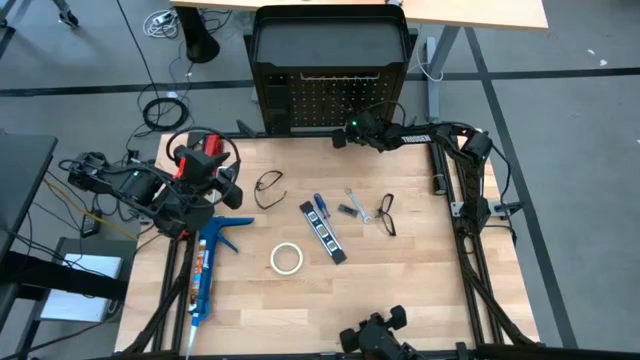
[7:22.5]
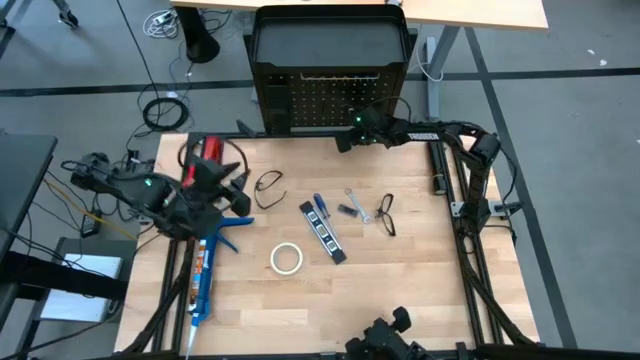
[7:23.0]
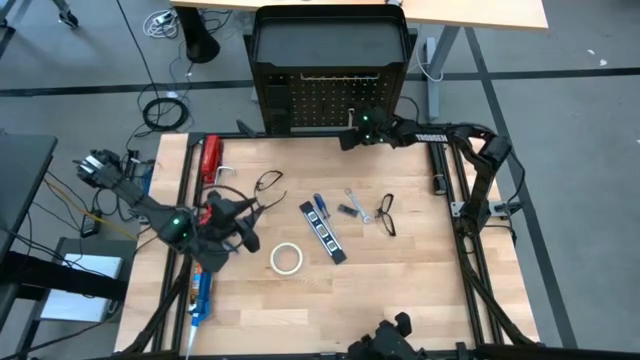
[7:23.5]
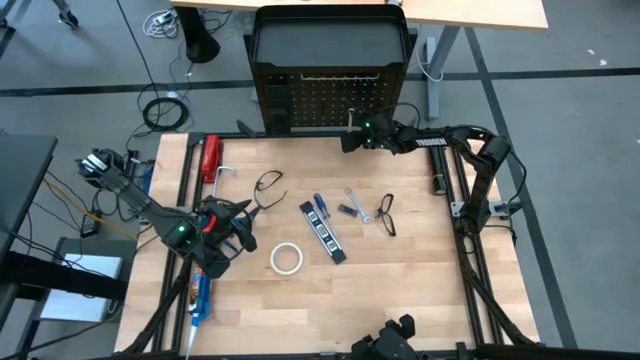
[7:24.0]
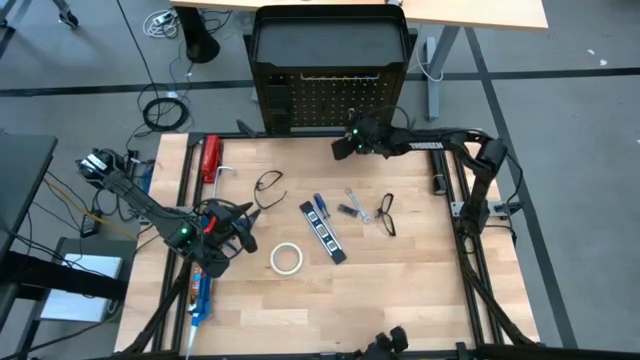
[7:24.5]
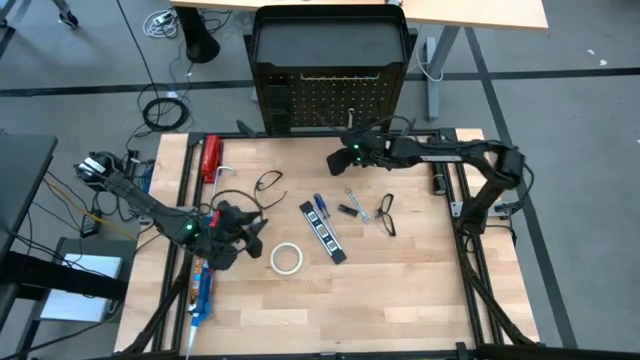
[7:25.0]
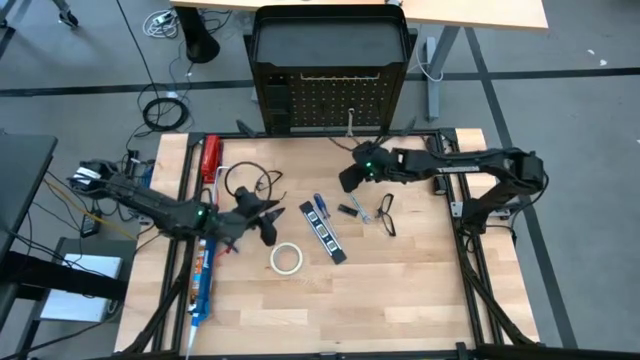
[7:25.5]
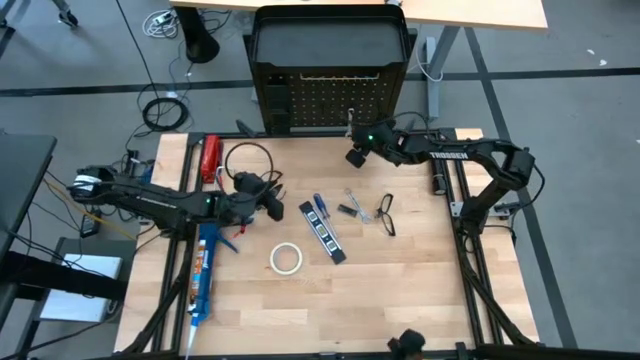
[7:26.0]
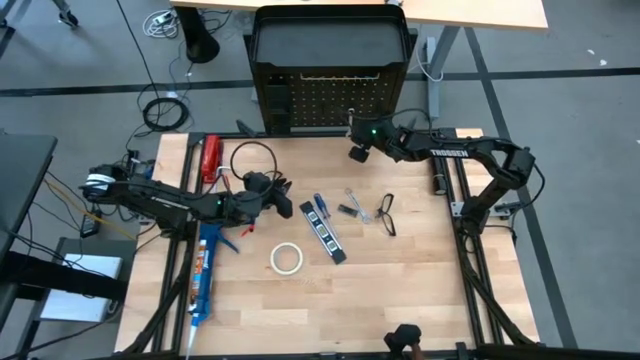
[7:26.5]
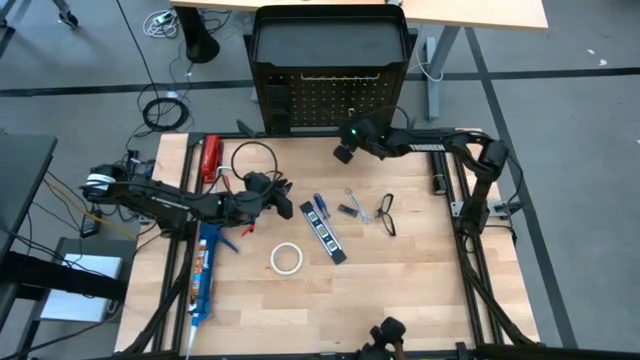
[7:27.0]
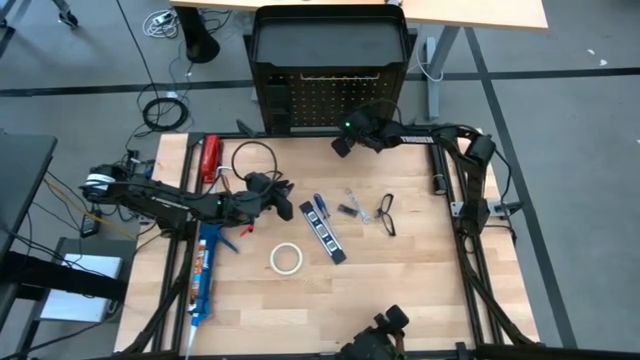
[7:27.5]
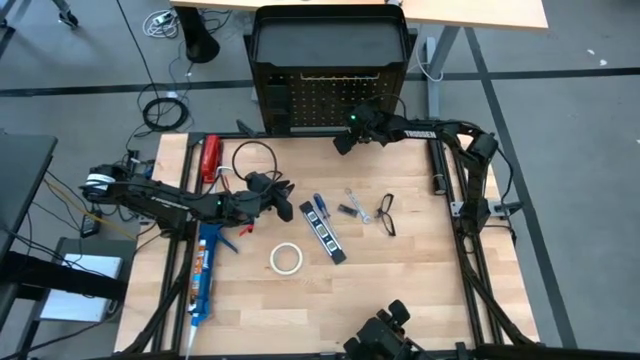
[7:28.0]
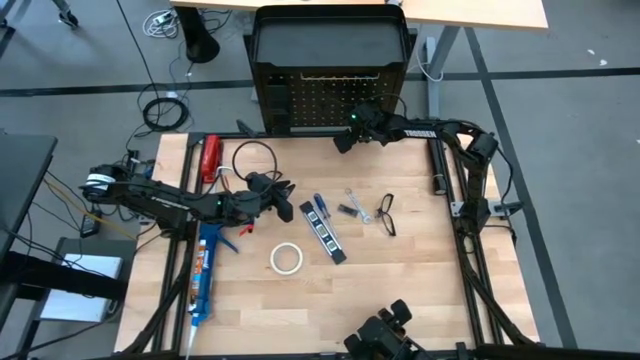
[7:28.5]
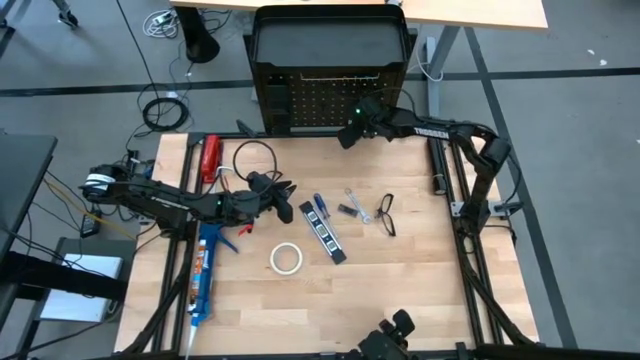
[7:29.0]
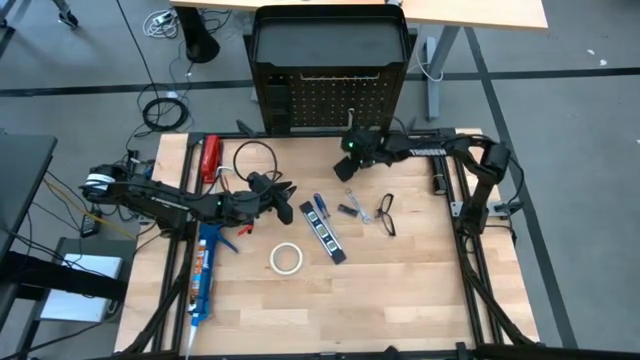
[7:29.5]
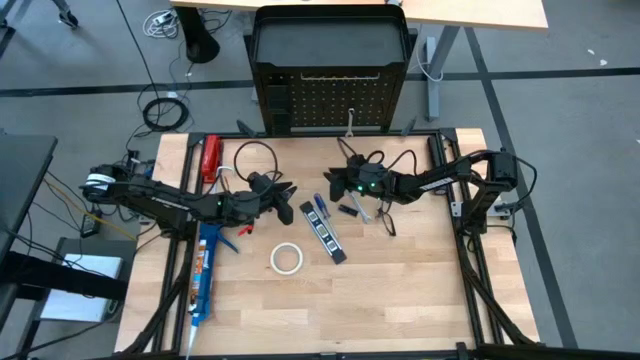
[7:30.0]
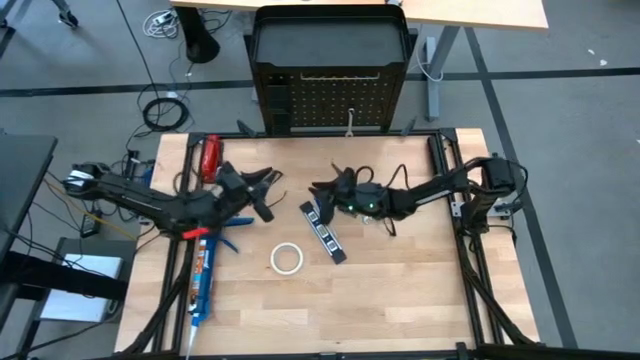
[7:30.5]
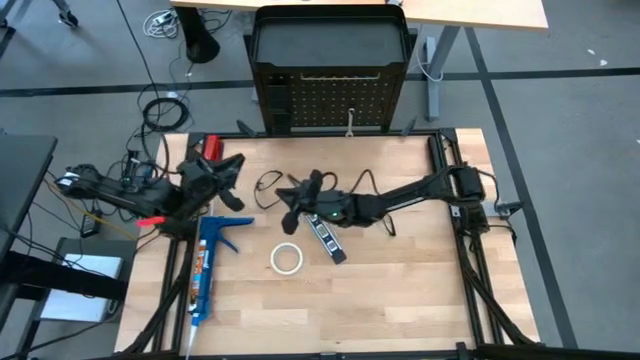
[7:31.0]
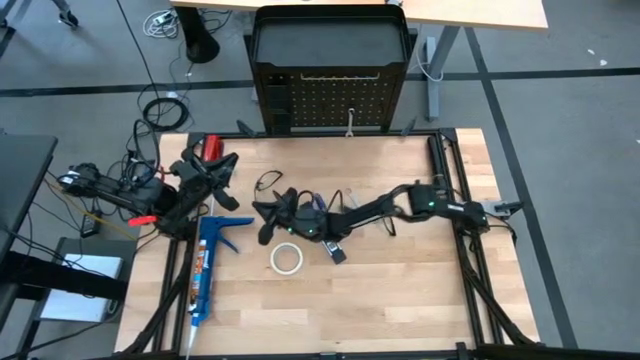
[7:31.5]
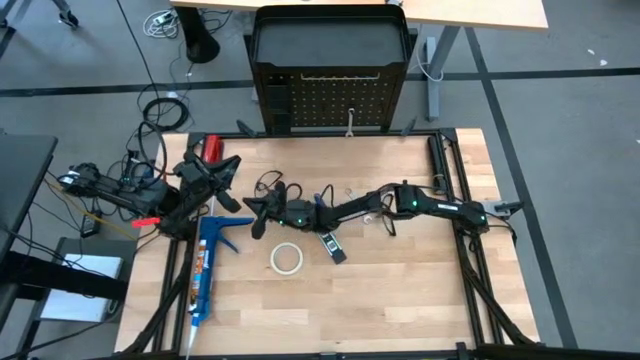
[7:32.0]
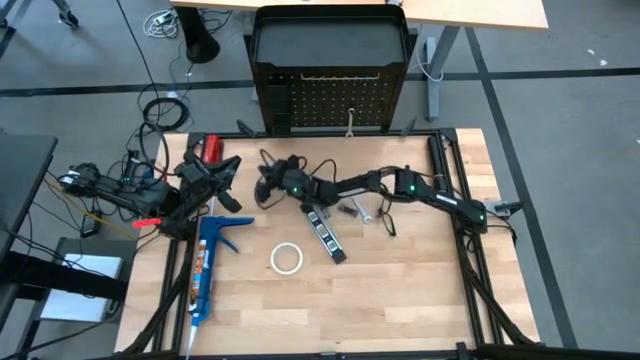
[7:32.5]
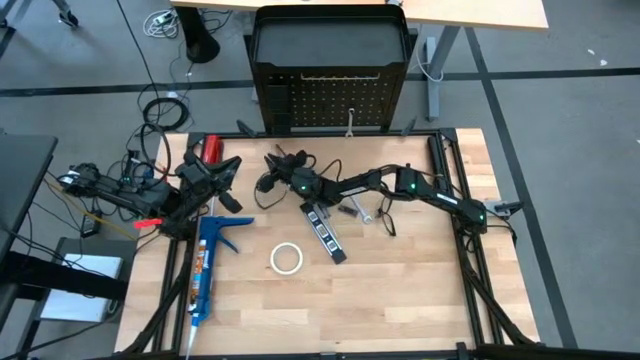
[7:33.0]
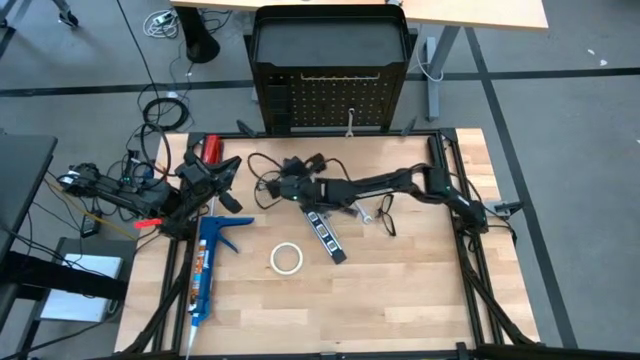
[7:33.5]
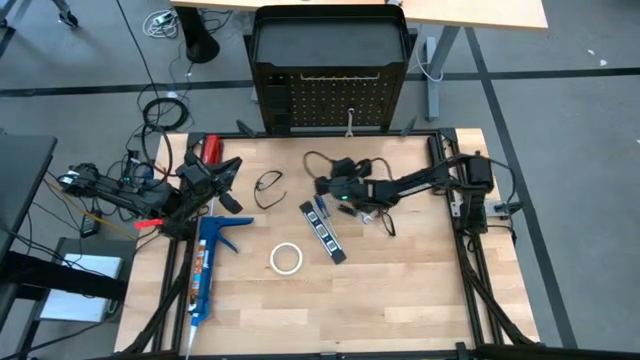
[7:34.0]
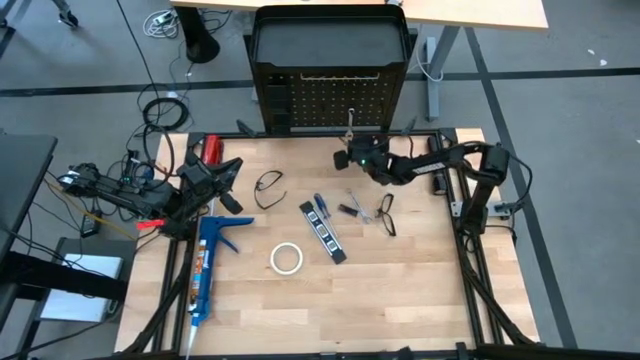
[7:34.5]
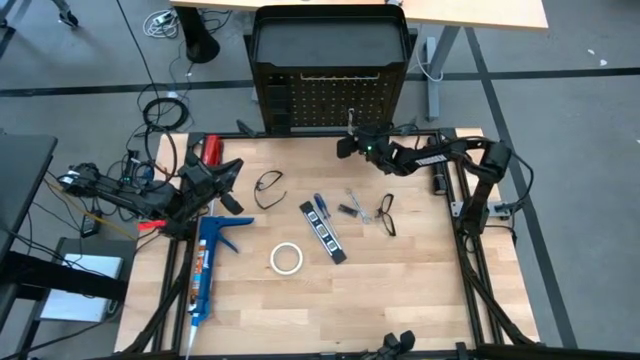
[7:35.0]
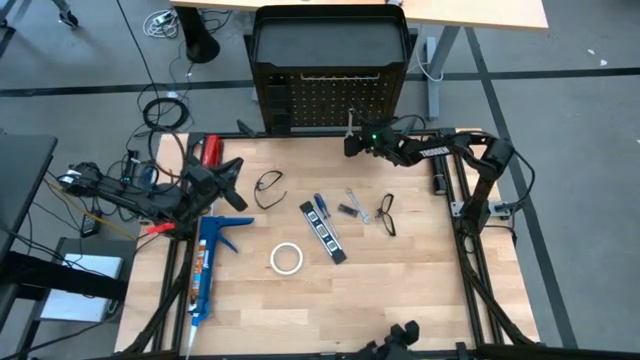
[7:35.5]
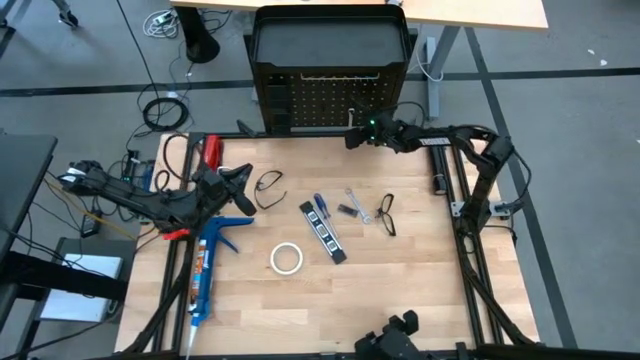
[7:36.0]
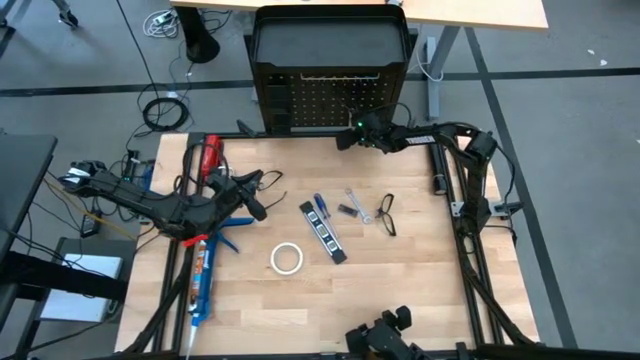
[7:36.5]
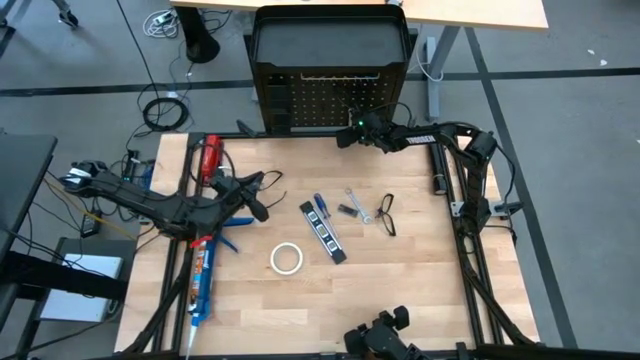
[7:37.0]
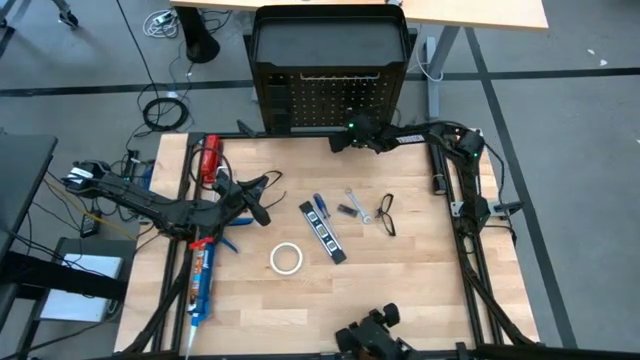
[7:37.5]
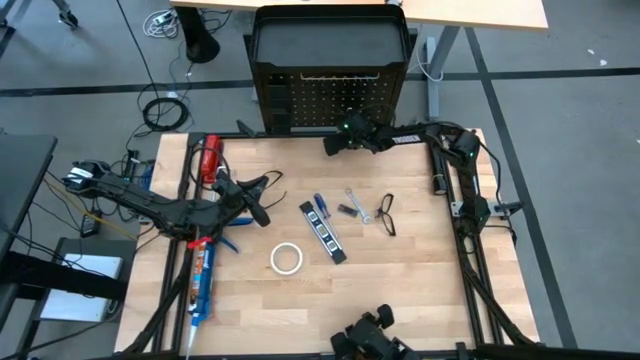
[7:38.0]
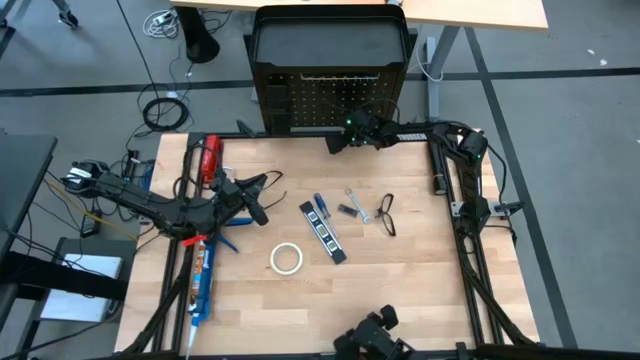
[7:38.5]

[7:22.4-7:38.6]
Task: Hang tools onto peg board
Unhang the wrench from the black pegboard

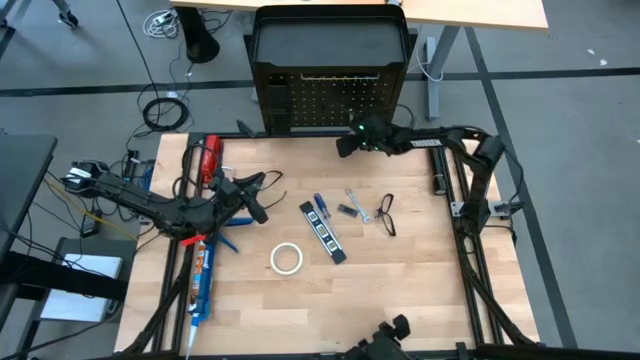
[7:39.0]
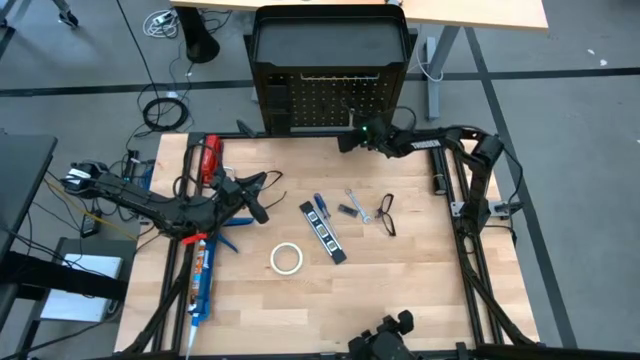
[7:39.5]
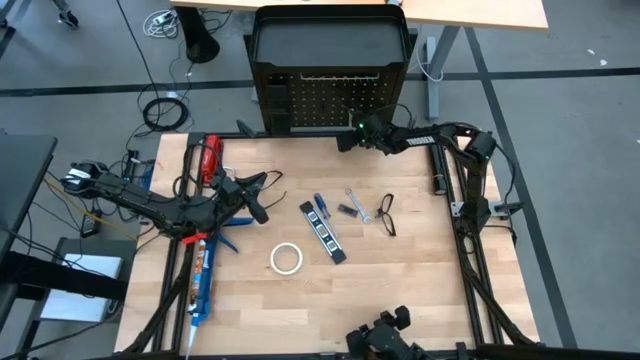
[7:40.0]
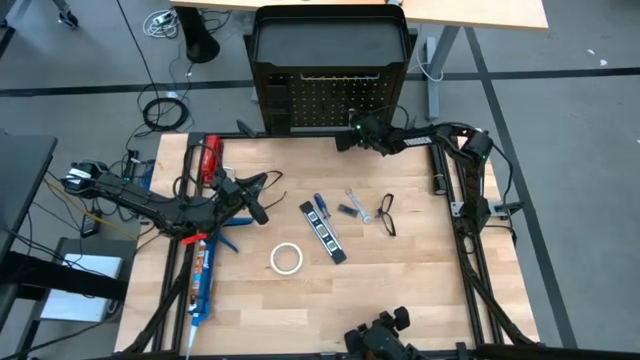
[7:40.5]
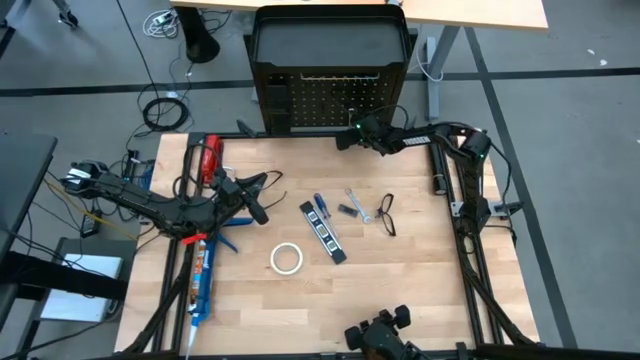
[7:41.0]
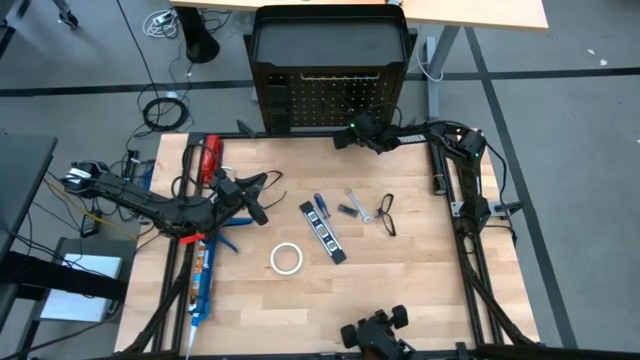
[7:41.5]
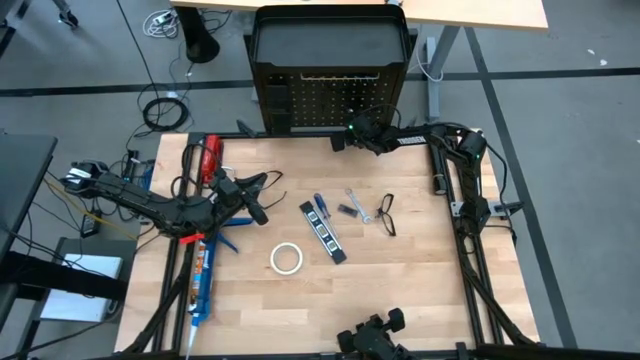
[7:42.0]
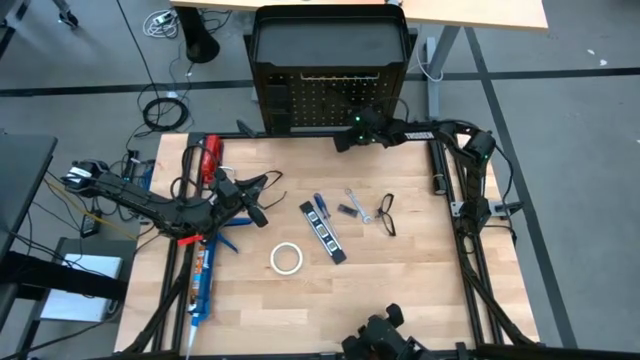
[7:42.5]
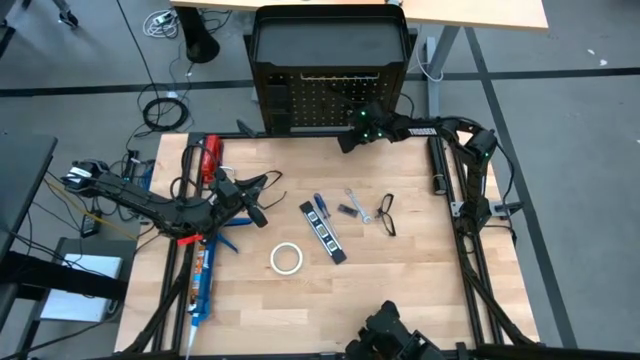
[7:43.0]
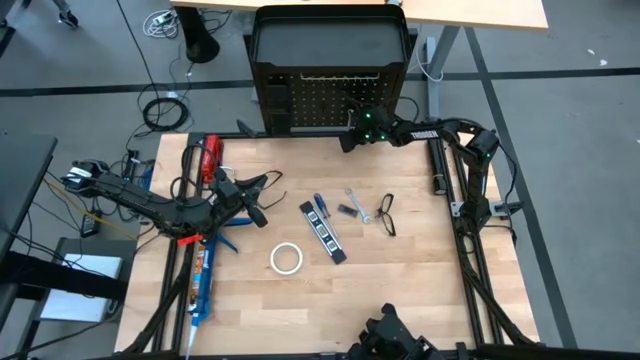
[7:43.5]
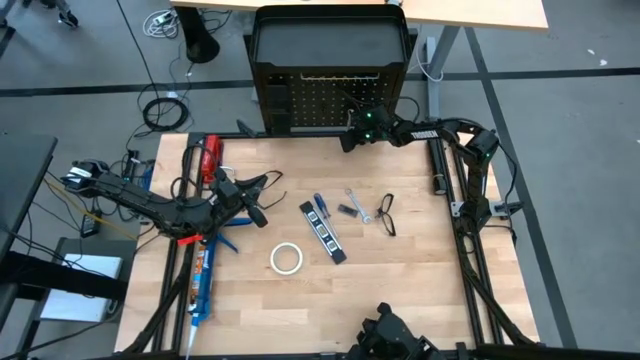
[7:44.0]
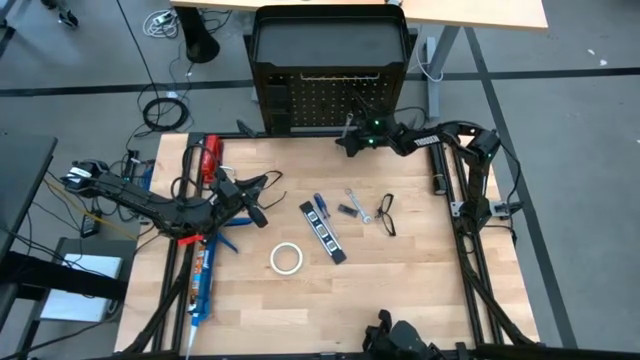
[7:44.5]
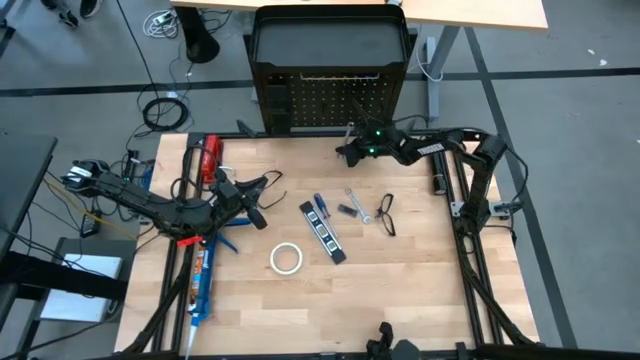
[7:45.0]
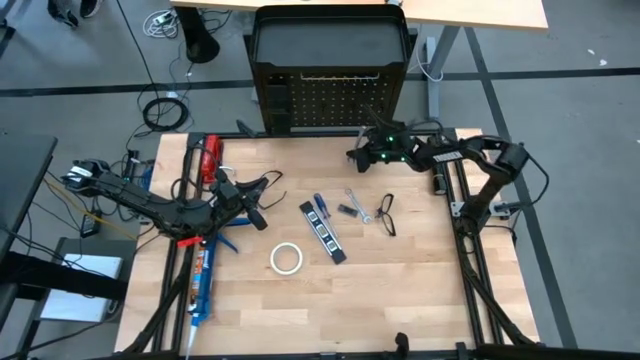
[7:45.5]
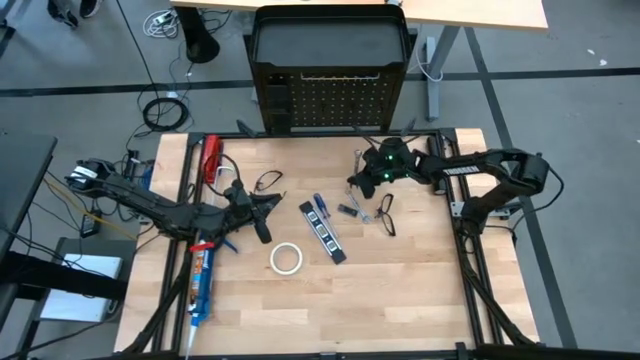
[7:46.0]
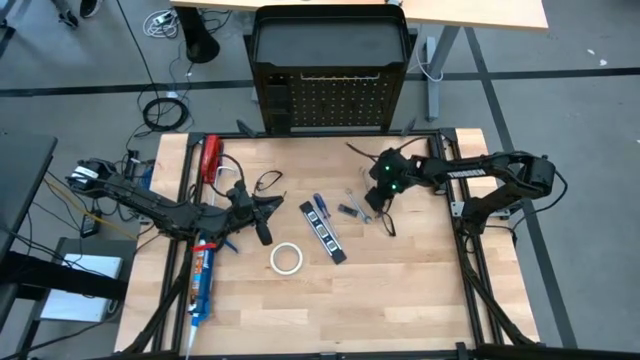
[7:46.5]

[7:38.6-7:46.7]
Unhang the wrench from the black pegboard
